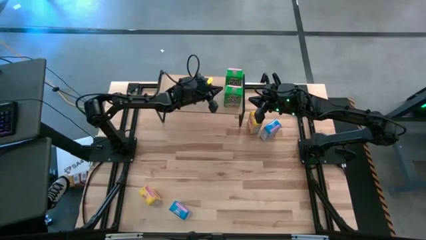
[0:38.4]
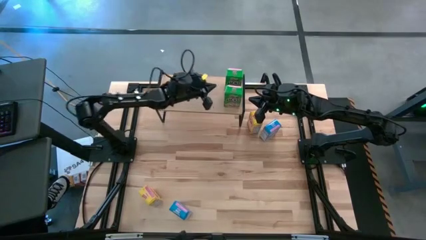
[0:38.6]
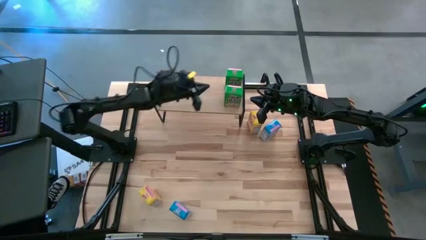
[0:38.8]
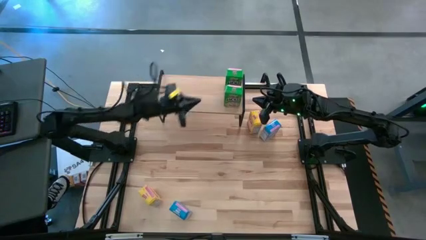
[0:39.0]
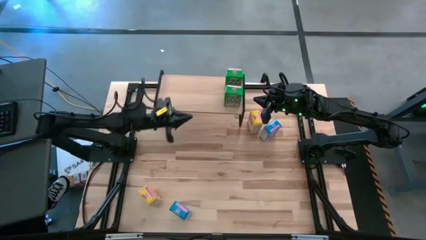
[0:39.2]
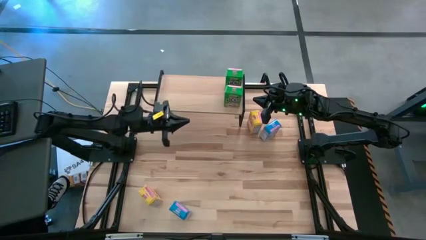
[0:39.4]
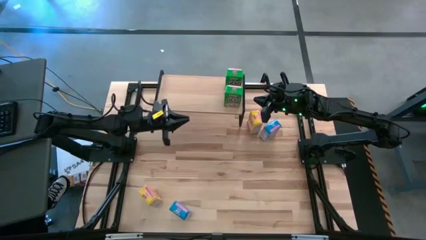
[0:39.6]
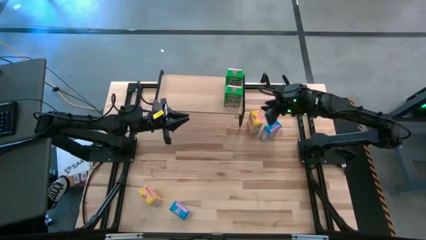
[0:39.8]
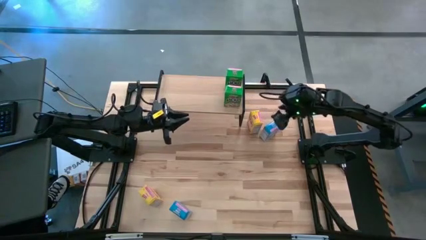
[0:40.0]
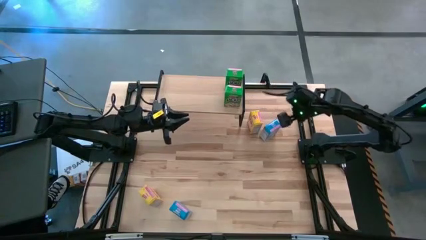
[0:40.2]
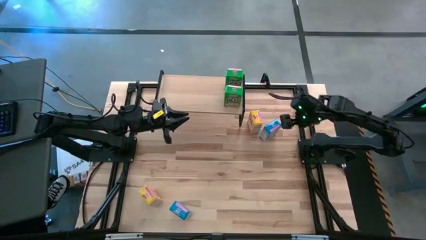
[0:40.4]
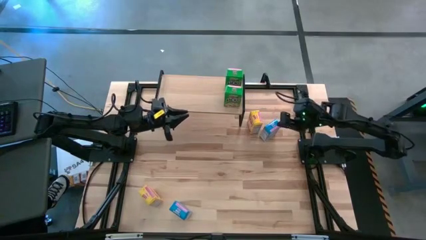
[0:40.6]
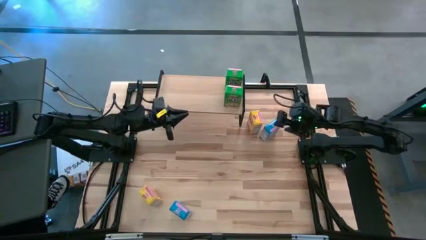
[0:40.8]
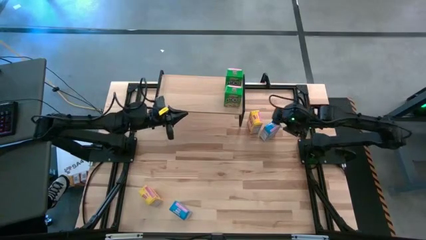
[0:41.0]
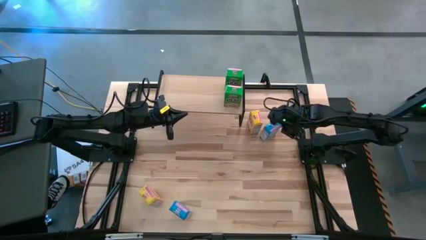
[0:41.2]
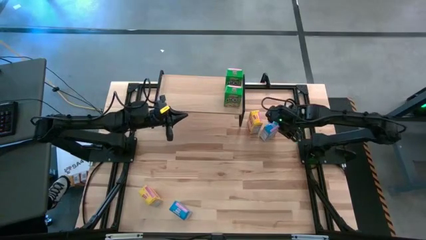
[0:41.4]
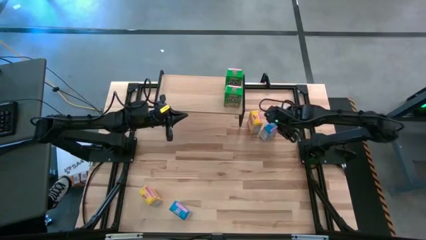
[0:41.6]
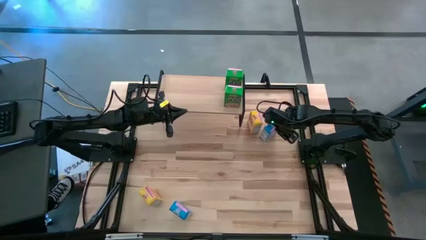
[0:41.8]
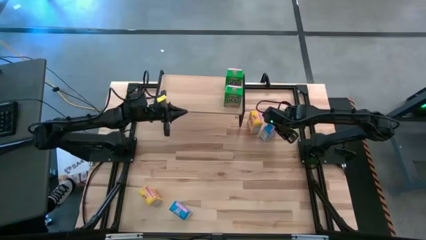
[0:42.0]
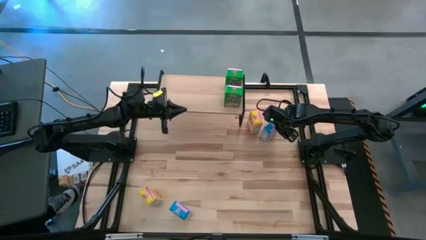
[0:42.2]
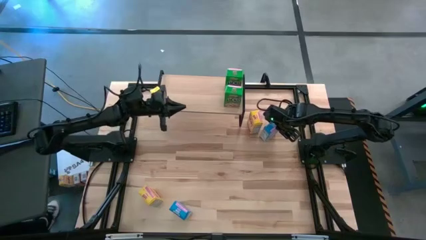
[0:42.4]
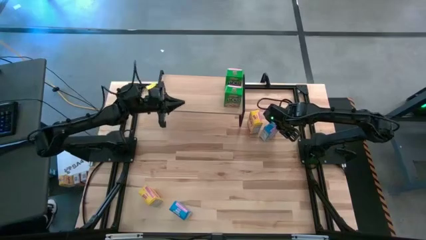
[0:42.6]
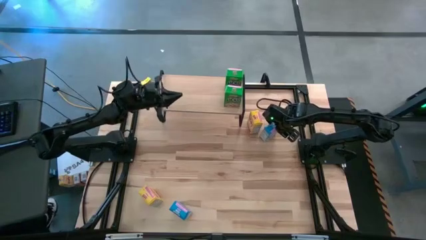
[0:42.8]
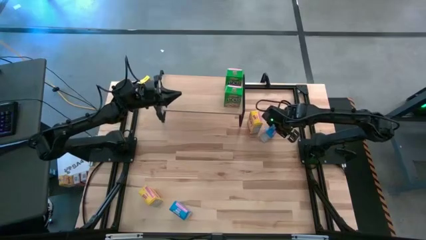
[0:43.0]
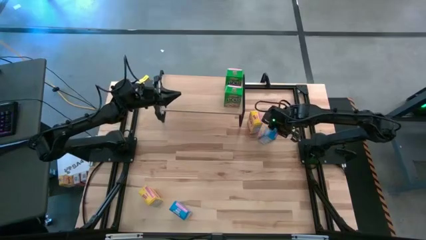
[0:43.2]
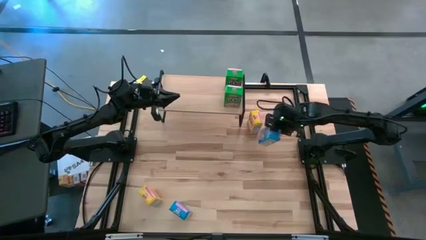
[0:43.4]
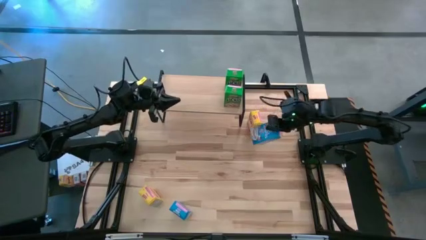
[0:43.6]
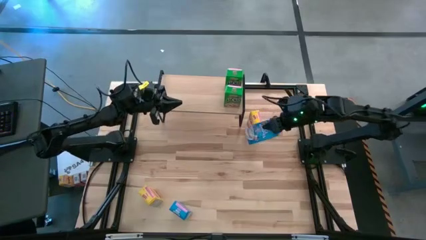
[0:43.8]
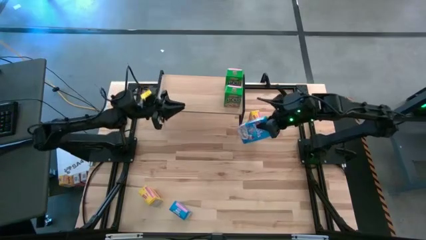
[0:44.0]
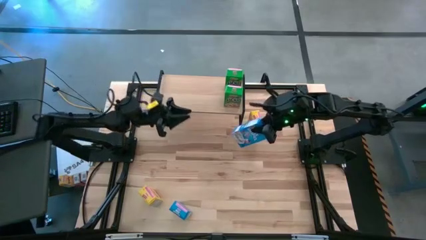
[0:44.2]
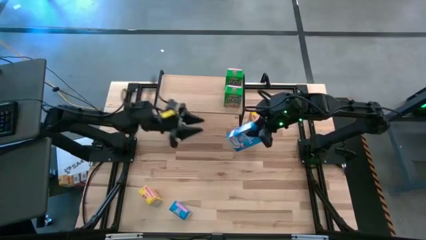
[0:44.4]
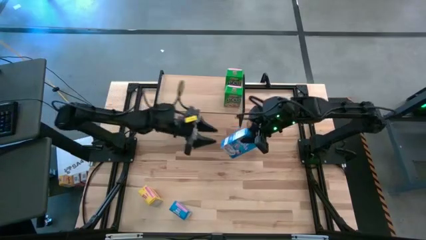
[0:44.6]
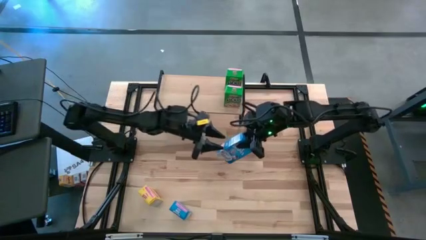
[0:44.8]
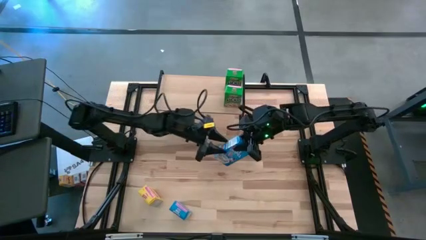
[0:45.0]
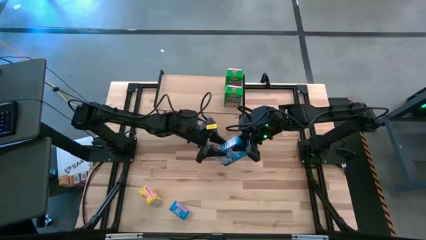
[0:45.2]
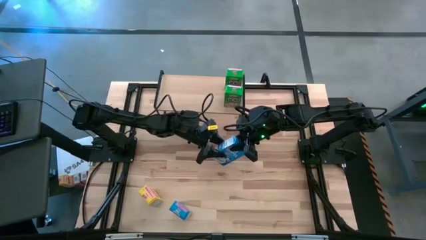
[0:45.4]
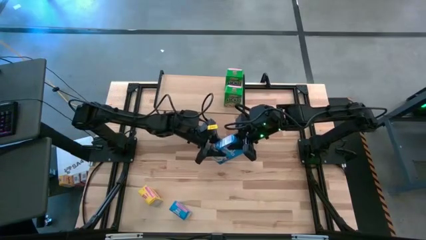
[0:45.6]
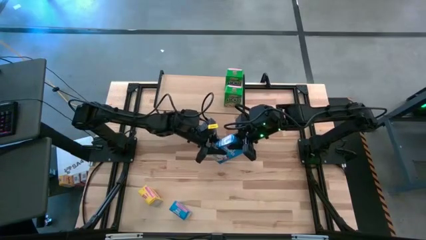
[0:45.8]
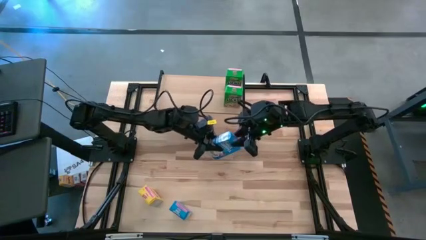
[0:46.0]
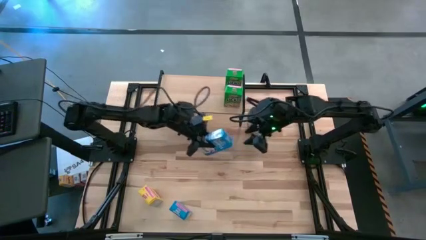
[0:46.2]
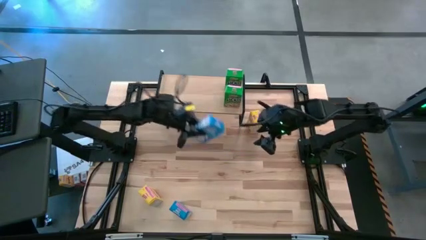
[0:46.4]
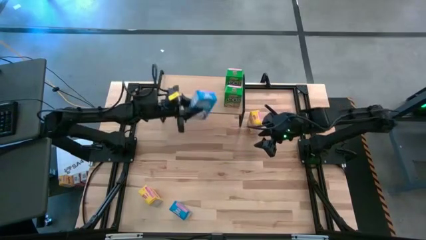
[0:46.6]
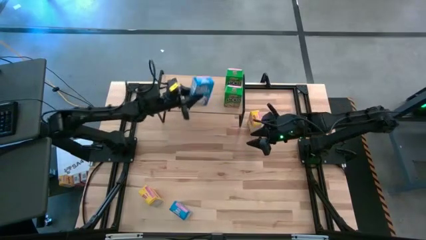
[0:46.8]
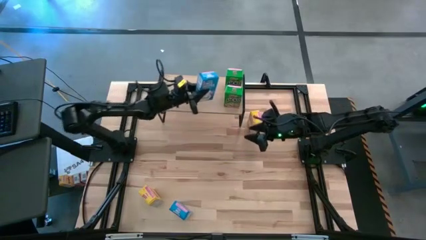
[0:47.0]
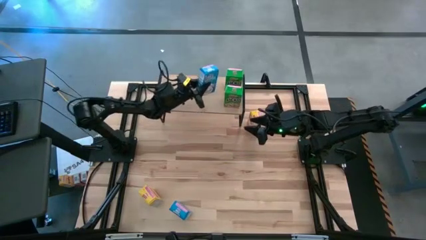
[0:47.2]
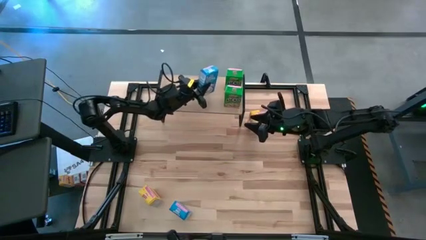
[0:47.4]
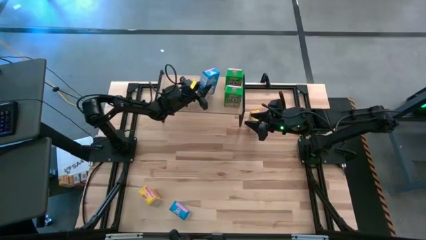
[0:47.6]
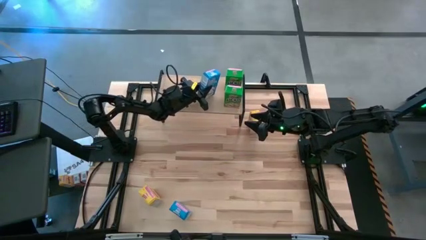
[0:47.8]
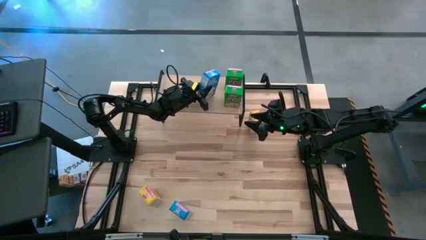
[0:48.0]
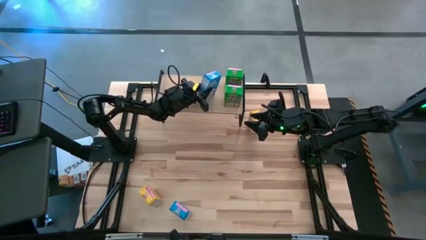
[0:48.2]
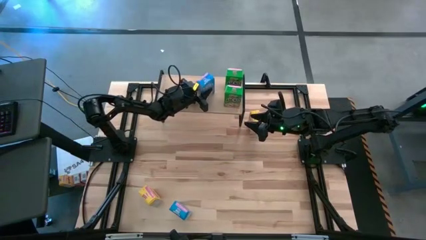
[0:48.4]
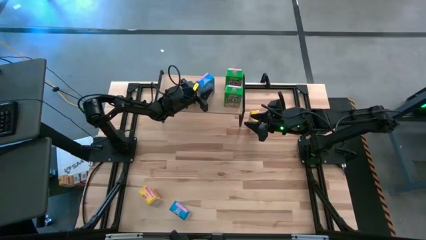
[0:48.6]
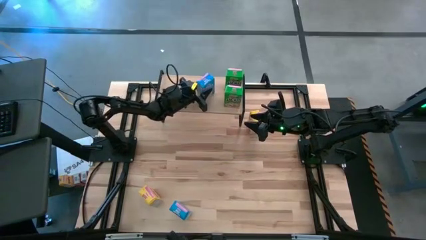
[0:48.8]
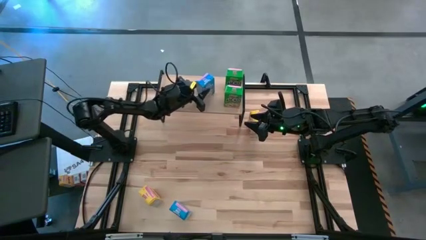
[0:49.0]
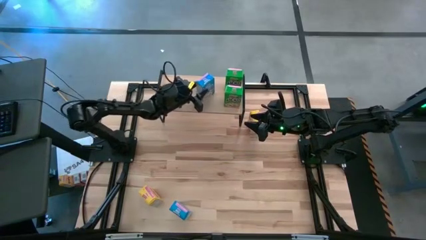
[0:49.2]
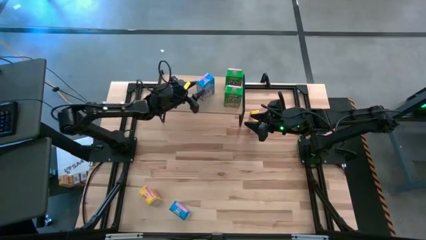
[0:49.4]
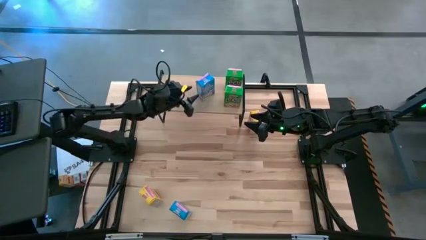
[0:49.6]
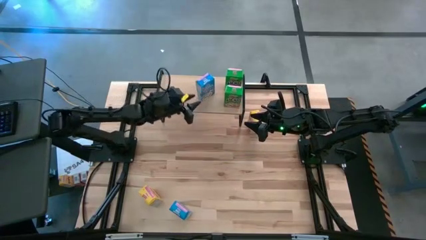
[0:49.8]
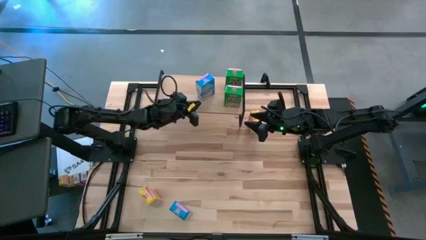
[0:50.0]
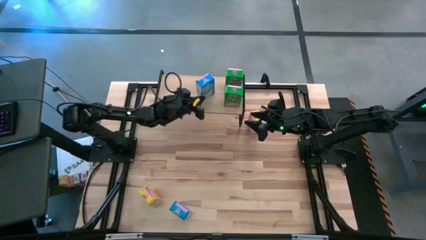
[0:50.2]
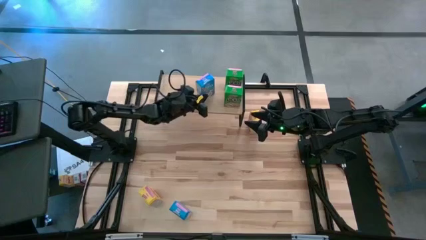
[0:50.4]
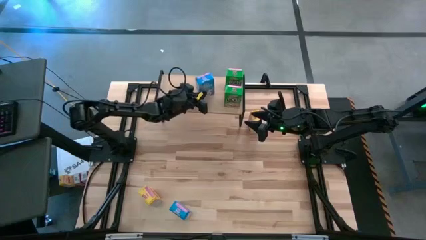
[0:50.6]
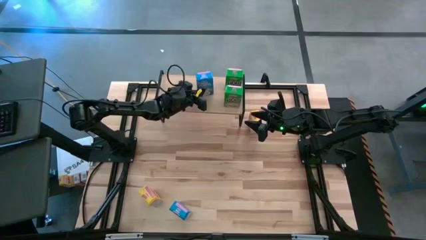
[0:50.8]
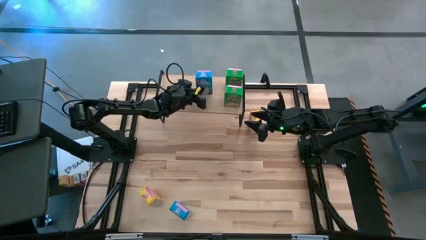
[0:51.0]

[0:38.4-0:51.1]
Task: Stack cereal on shelf
Put the top blue cereal box on the shelf

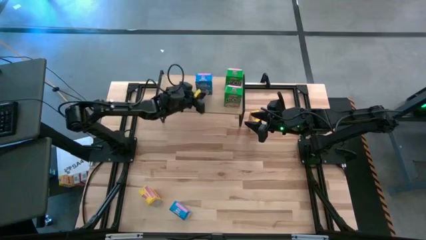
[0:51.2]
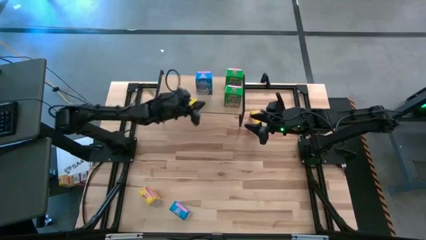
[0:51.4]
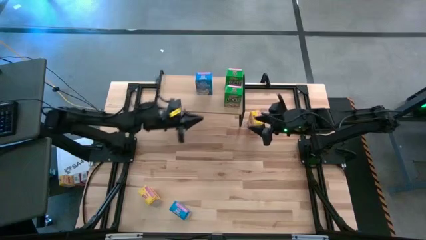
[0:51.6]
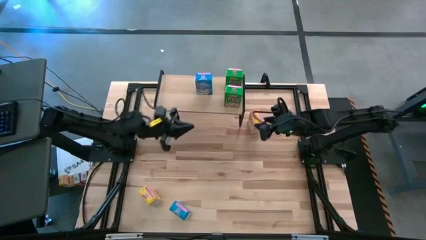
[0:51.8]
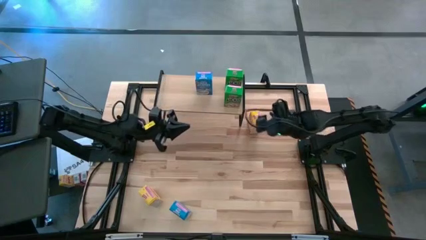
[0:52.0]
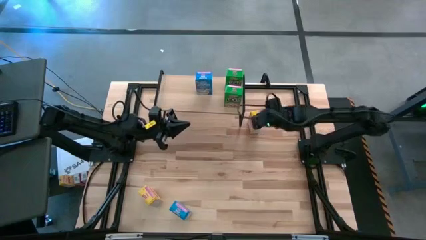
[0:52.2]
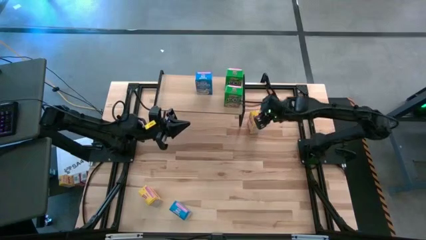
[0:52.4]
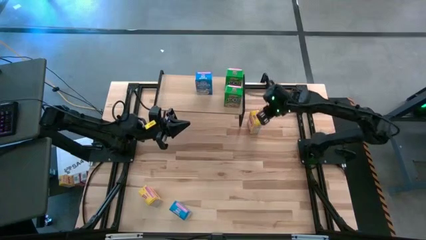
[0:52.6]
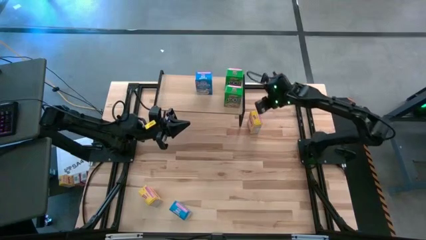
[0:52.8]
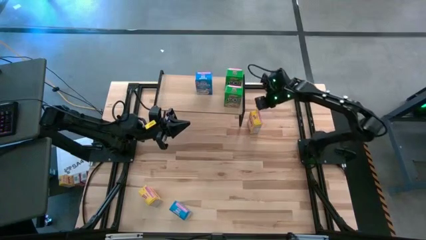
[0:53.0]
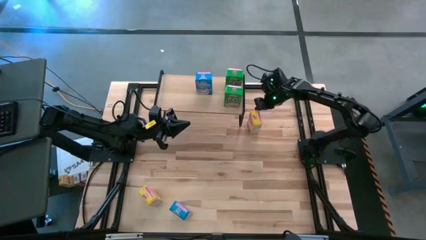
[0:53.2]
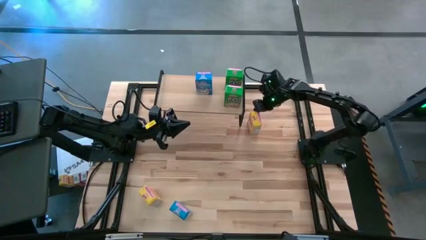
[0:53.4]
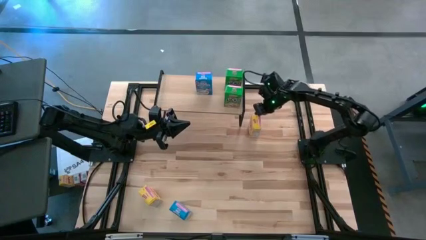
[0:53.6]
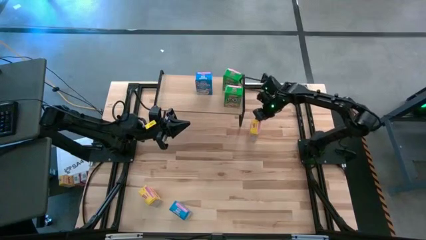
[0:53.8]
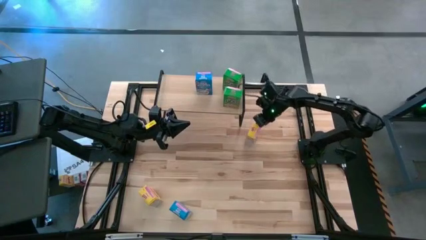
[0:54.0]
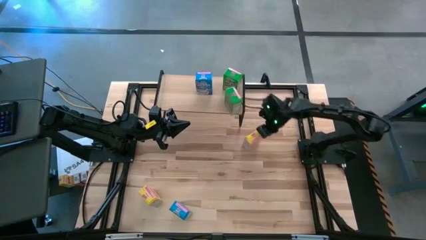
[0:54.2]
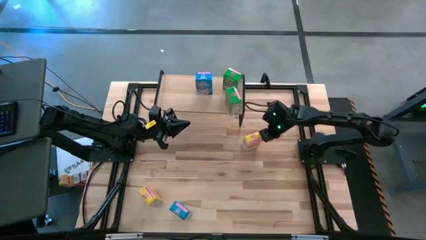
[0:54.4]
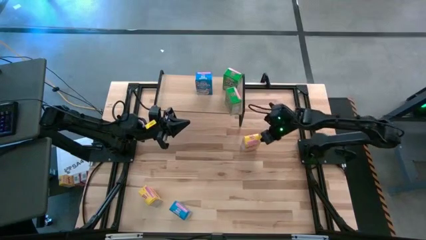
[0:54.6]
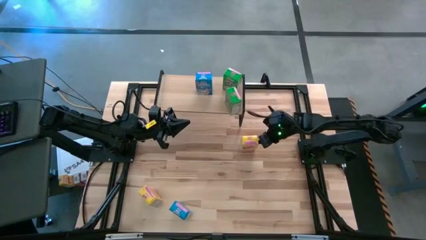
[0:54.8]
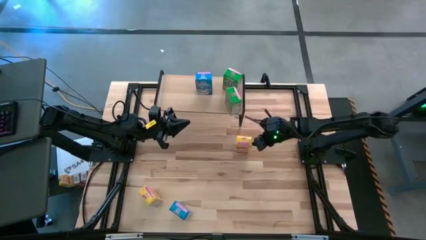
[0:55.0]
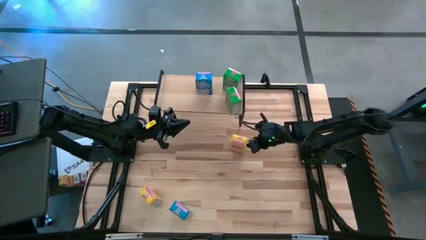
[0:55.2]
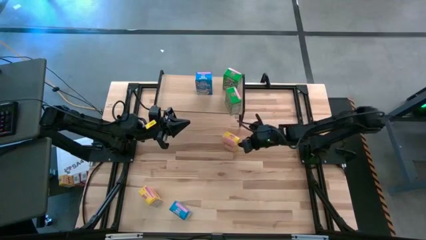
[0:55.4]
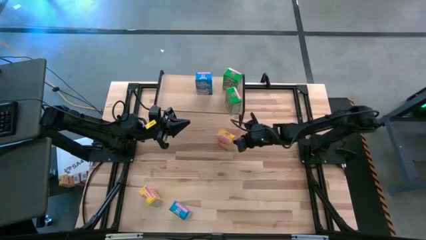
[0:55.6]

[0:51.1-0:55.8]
Move the top yellow cereal box to the center of the table
